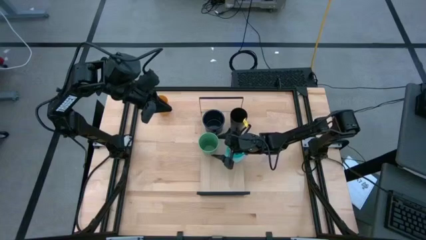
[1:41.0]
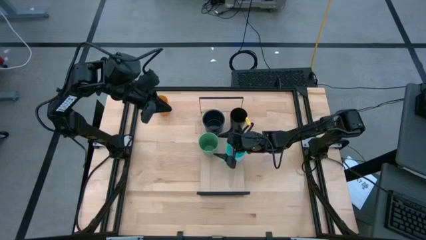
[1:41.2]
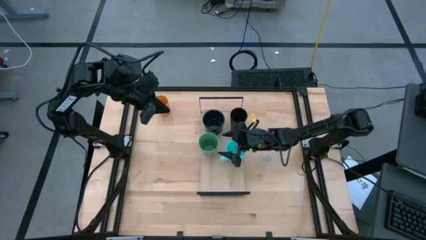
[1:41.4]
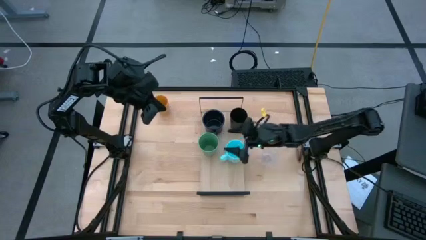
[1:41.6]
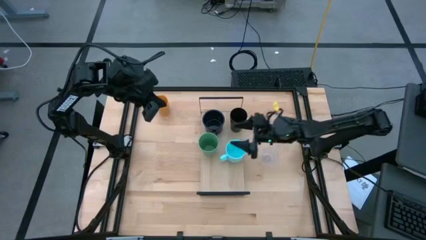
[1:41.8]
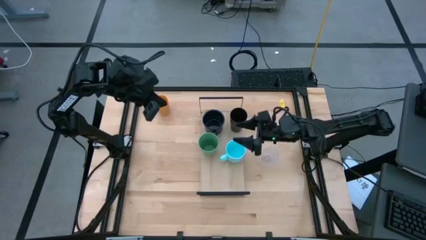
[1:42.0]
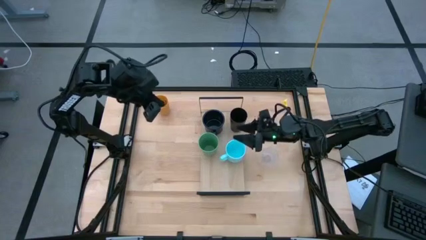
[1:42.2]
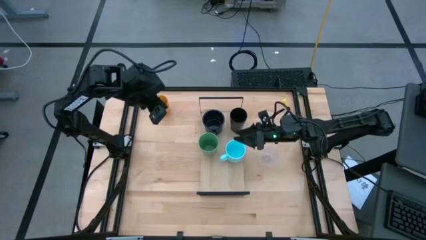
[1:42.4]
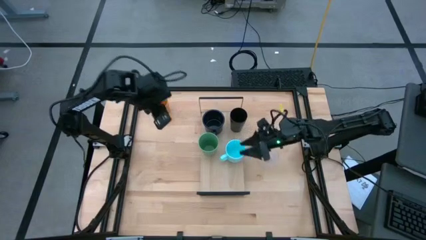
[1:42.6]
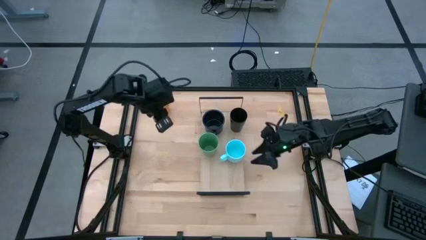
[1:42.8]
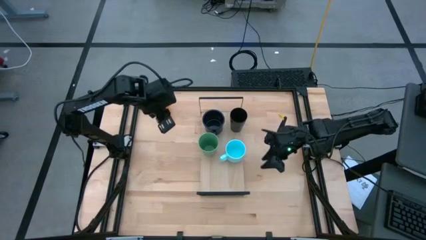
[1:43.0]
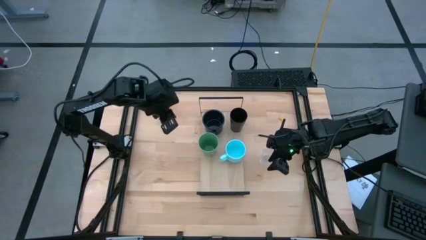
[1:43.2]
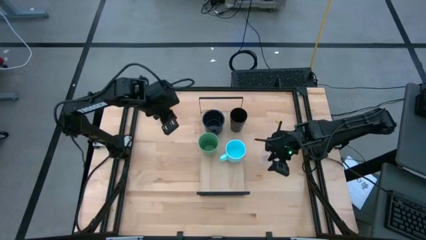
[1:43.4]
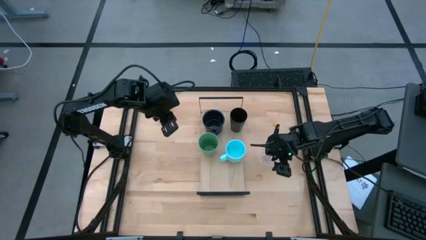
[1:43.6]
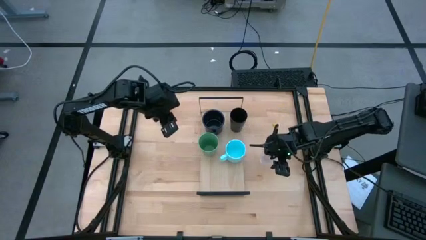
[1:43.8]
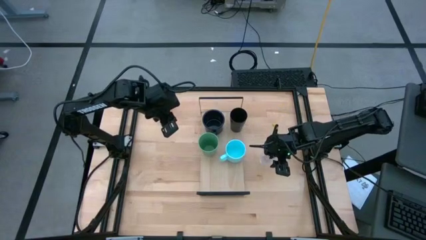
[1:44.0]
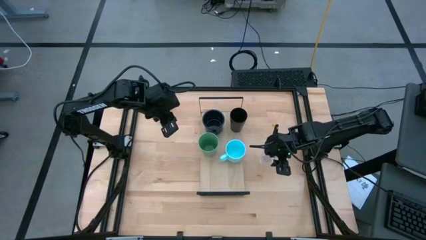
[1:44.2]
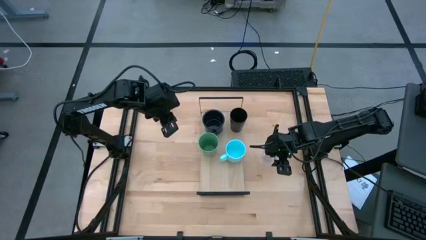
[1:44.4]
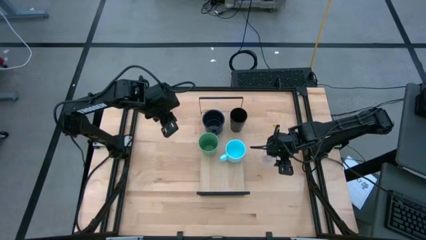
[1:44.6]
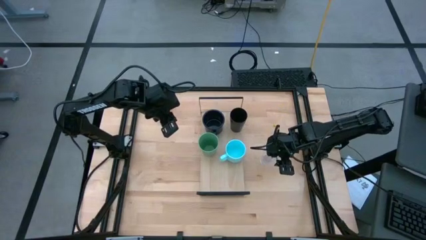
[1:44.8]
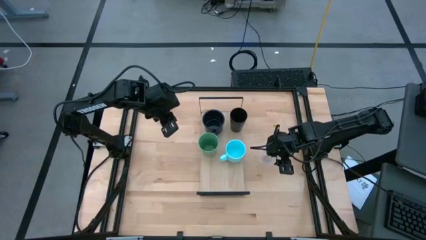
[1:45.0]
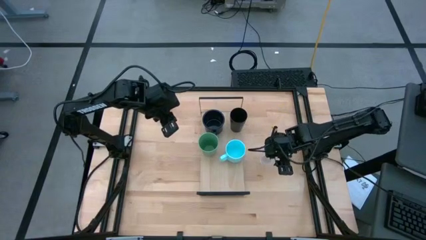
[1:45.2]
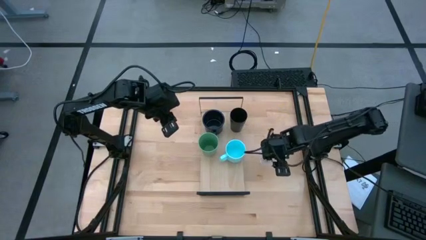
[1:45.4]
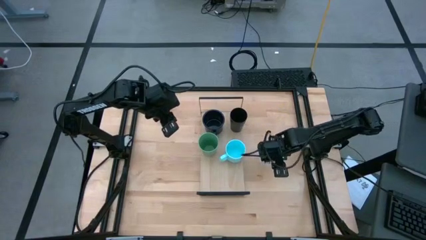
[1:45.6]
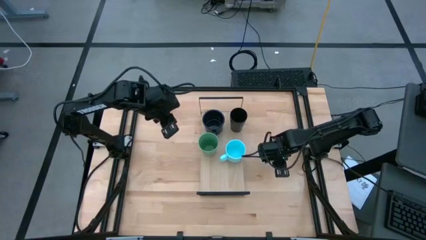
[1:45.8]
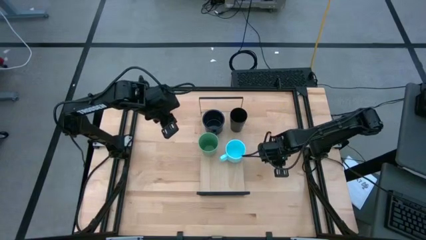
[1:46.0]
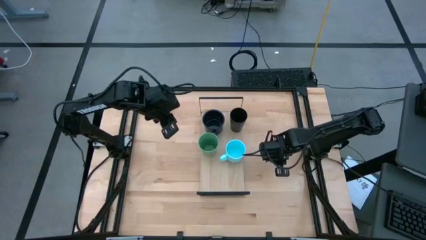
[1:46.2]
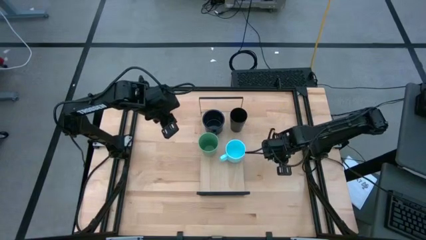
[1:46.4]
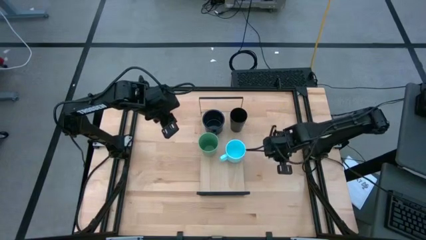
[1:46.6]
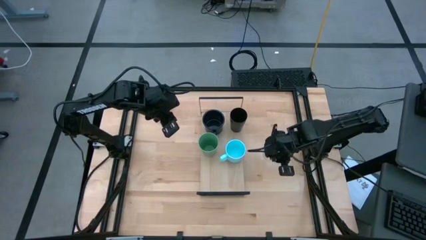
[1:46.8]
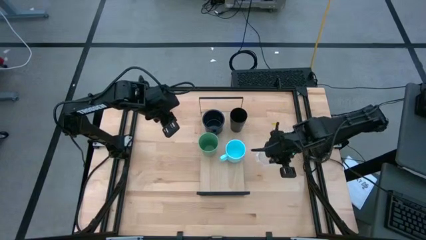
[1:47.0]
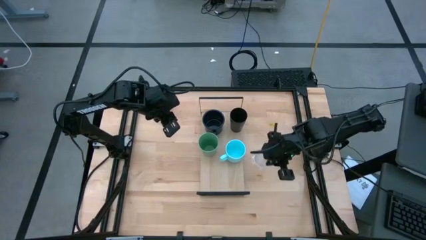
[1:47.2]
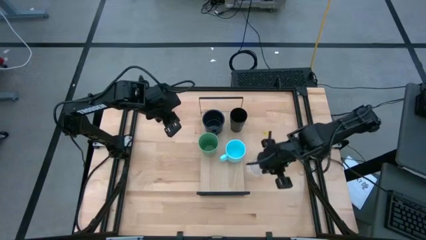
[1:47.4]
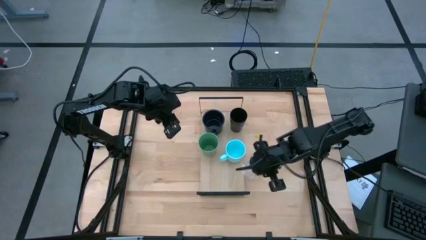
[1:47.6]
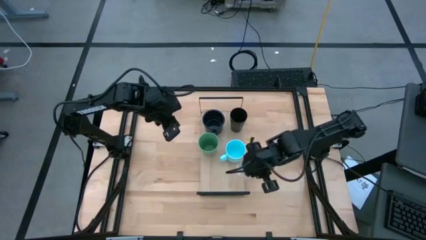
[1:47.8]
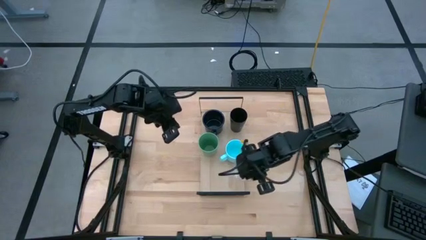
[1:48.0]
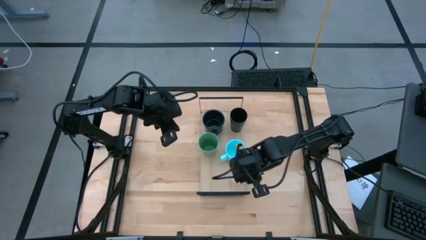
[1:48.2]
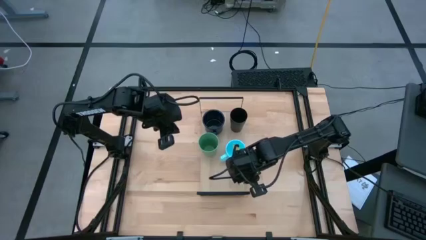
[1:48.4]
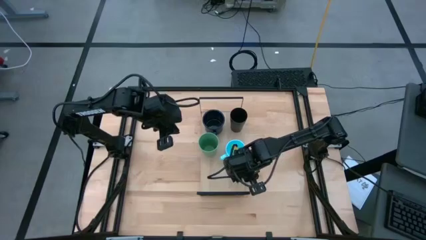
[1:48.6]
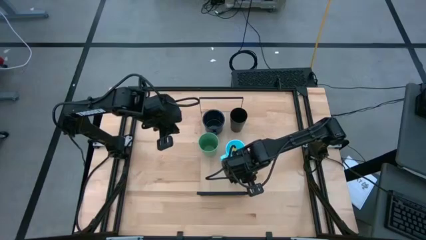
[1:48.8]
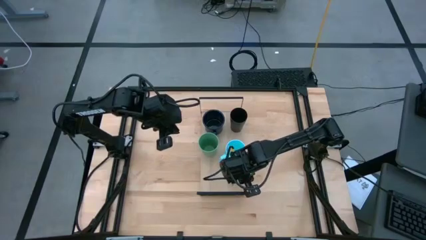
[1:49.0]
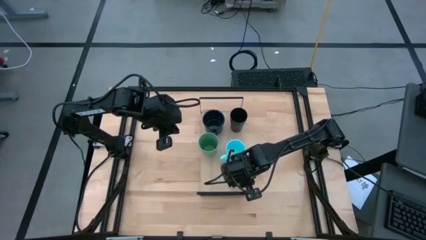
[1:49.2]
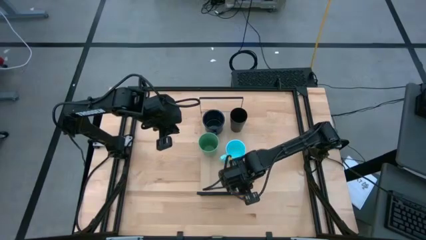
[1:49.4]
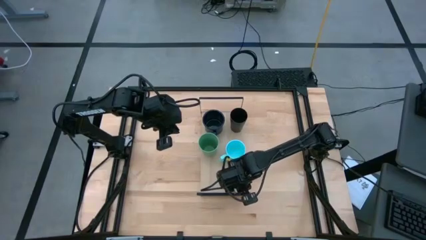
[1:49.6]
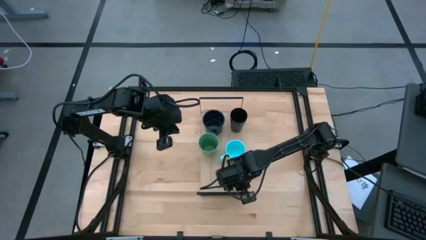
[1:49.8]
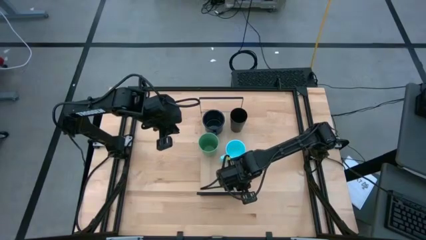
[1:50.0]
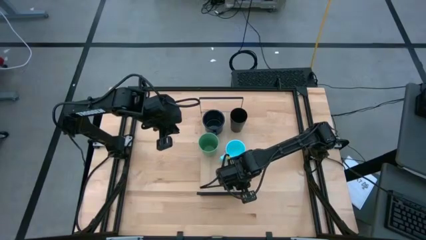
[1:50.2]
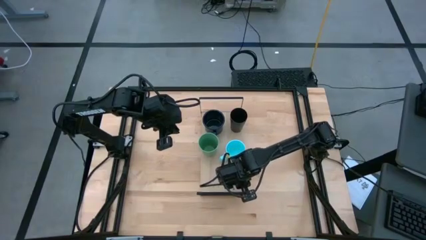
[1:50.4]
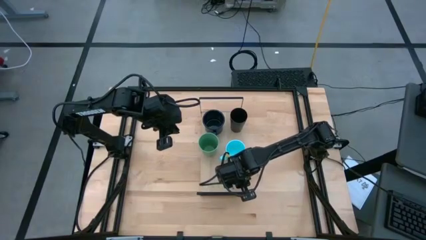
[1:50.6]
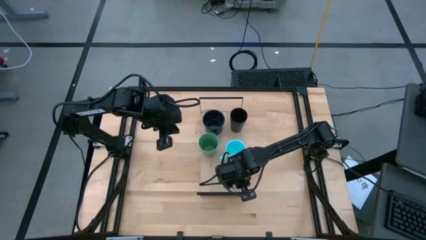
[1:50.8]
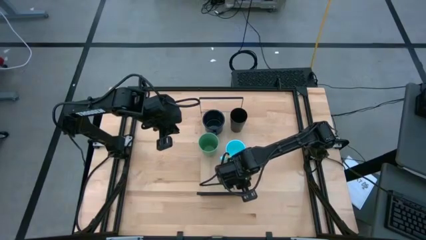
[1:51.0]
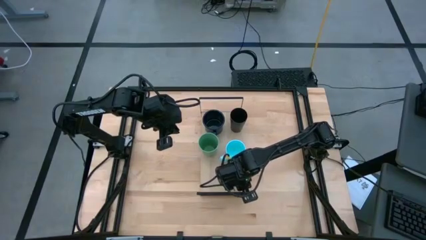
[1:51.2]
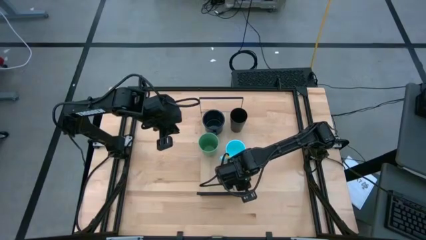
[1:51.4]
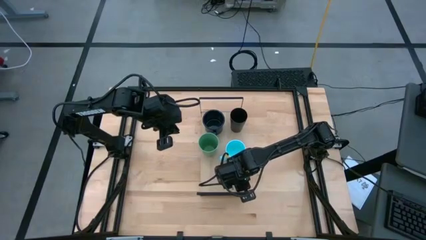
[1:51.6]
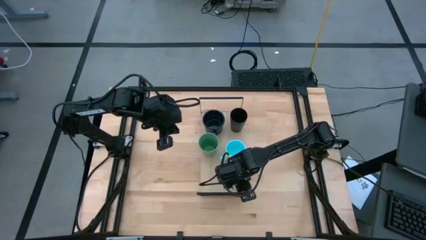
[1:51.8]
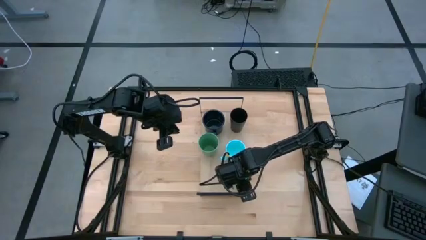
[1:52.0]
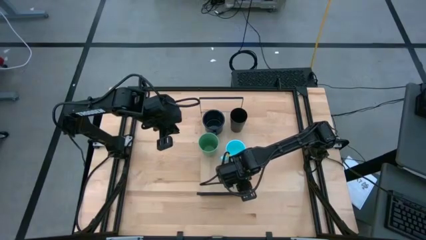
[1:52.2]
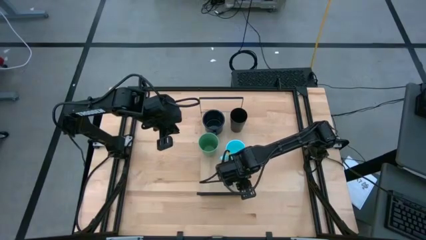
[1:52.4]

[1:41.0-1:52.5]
Task: Stack small to large cups/mugs on shelf
Put the transparent mug on the shelf
